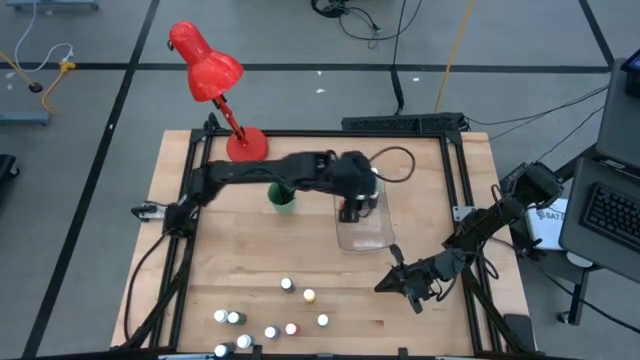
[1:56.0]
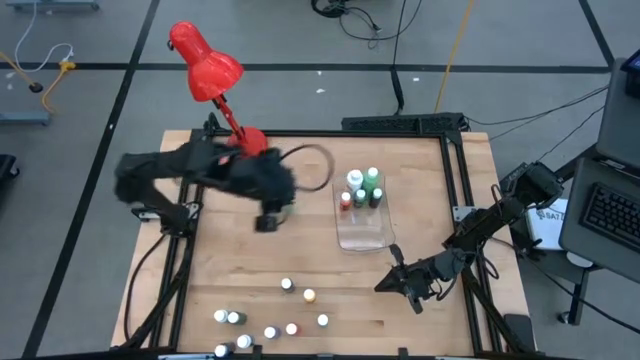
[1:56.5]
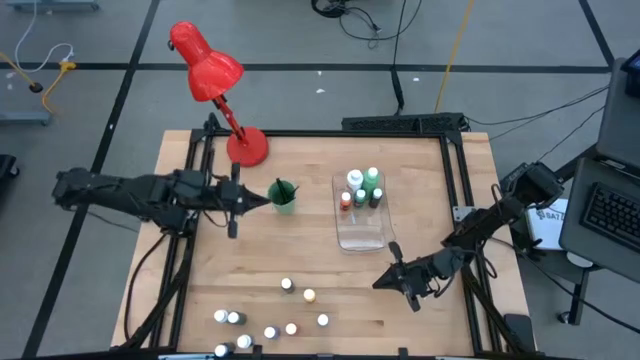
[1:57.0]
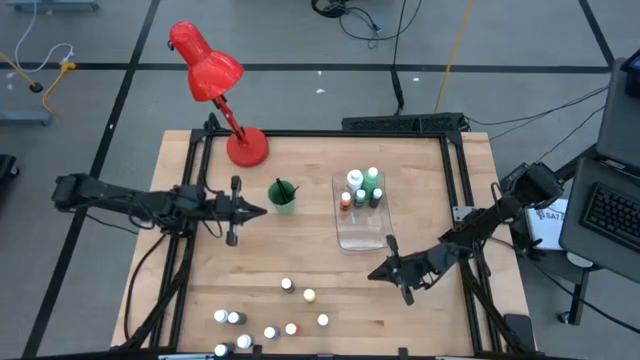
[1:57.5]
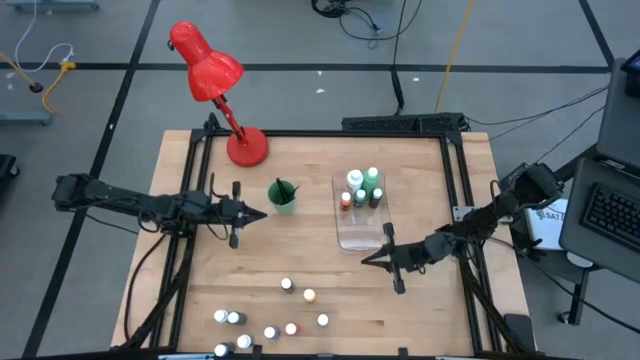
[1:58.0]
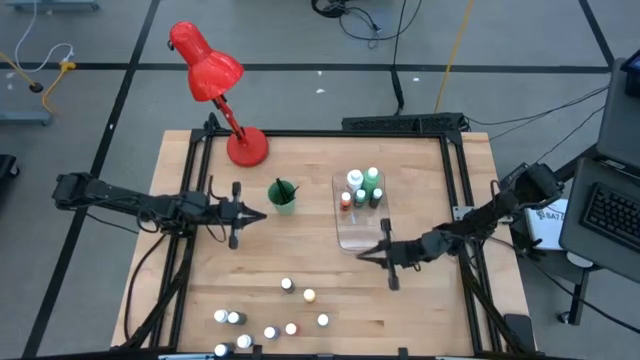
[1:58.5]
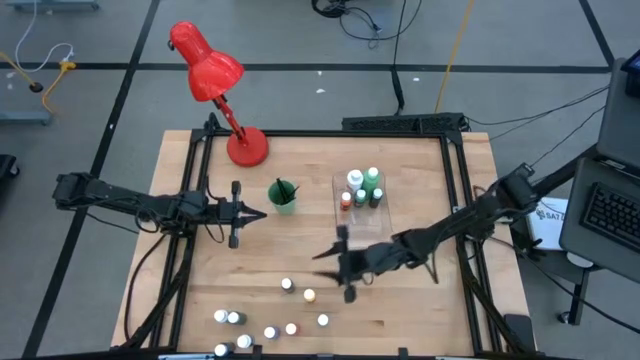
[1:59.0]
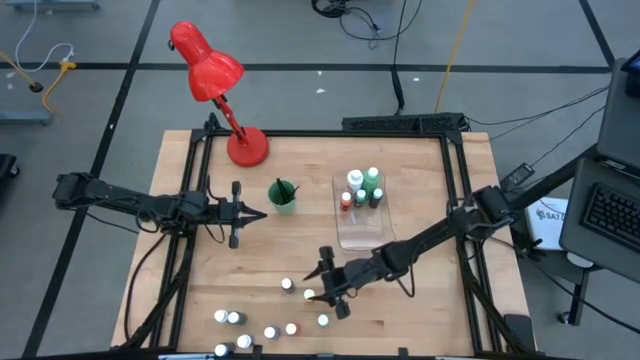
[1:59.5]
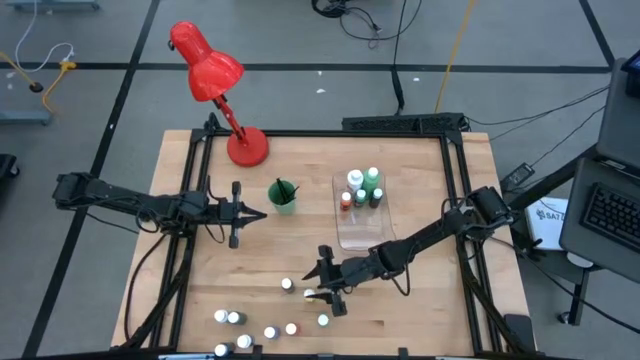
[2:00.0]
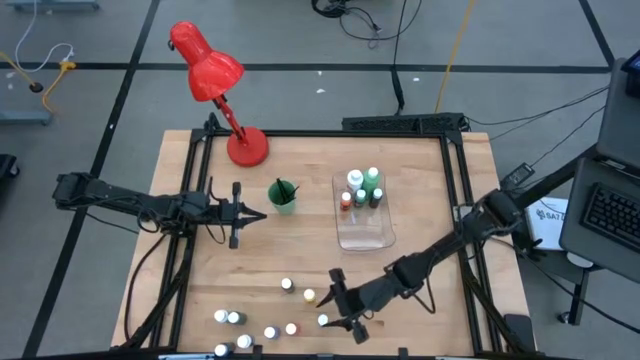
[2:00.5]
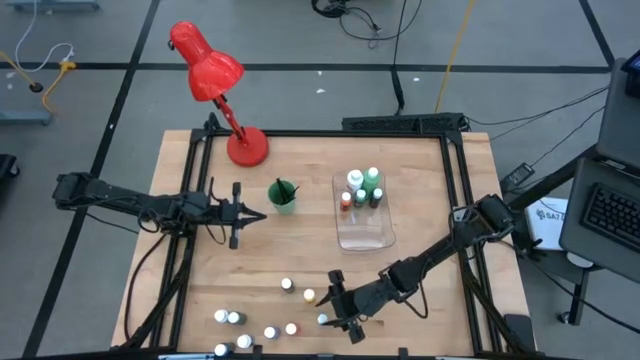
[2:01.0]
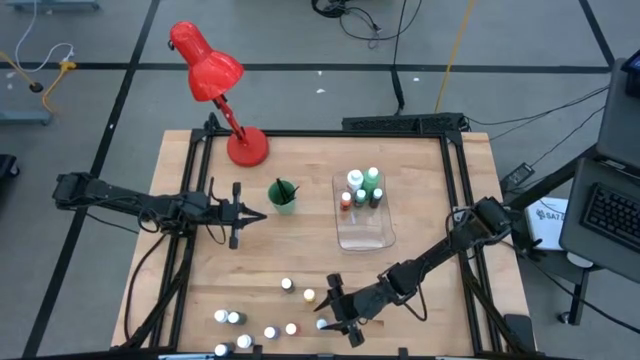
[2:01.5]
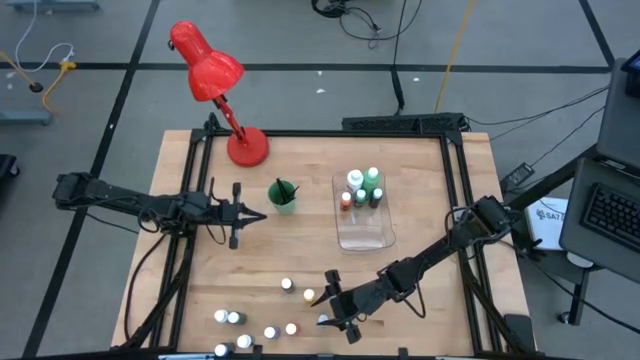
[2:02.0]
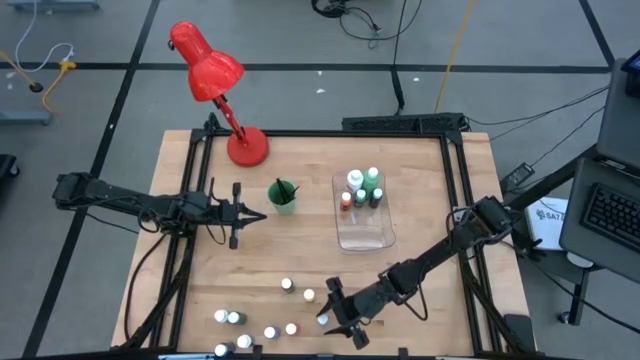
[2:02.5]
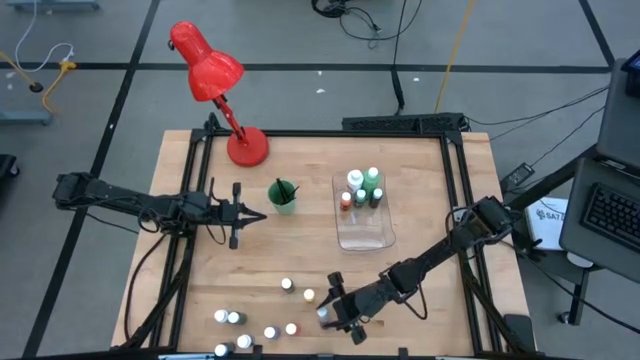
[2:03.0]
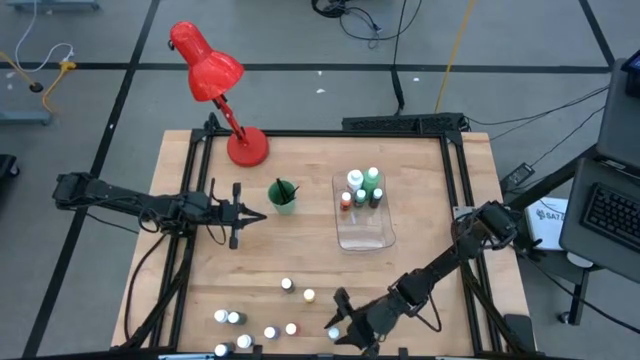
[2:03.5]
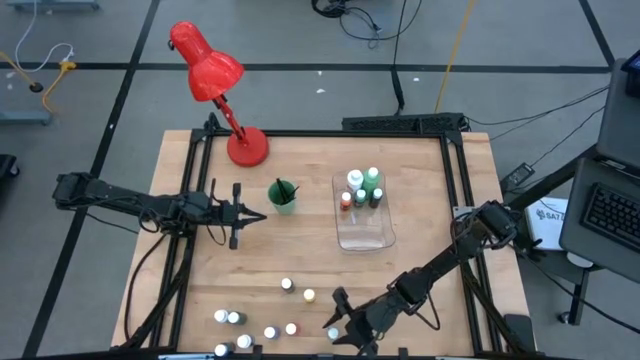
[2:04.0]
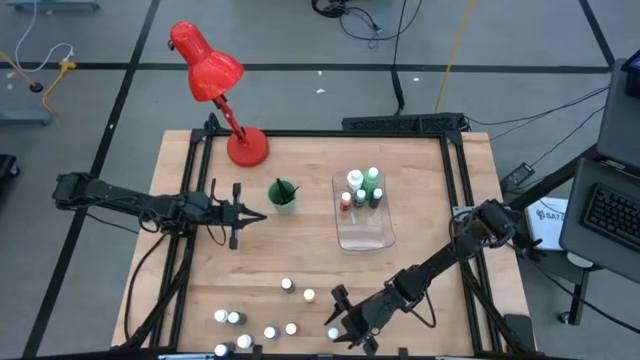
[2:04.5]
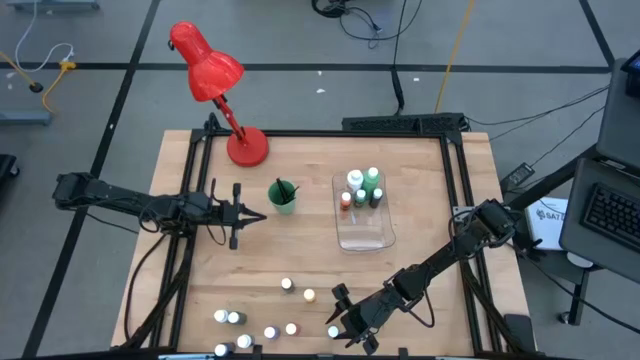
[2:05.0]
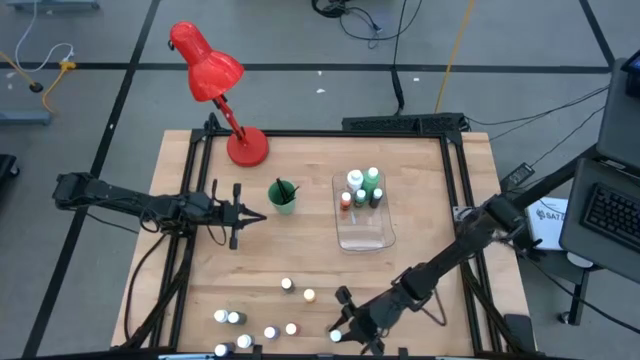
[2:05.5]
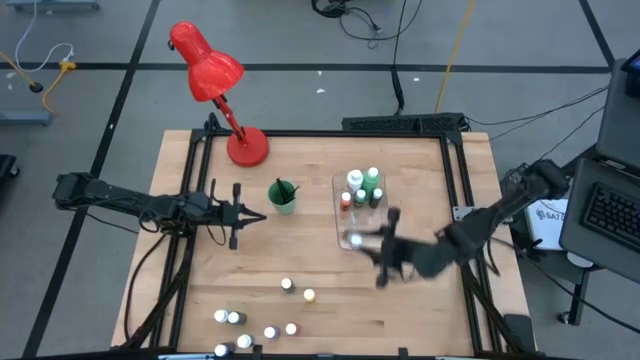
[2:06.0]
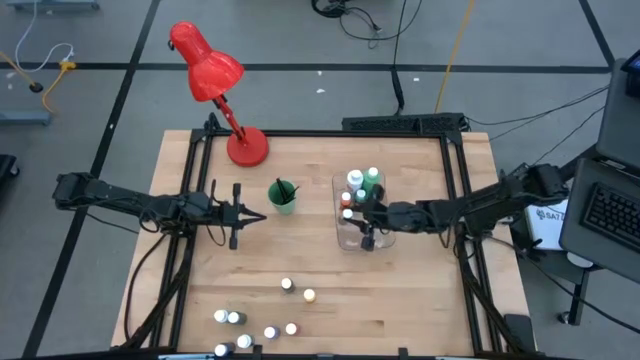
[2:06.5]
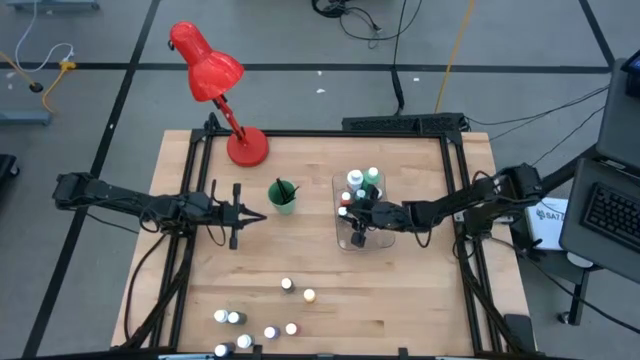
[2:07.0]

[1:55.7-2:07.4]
Task: Pick & Place Paint Supplies
Put the small gray paint bottle into the transparent bin

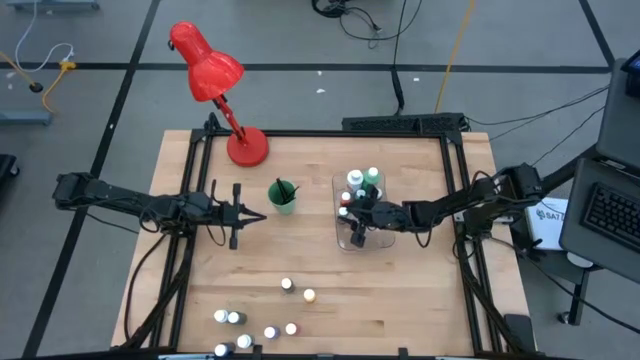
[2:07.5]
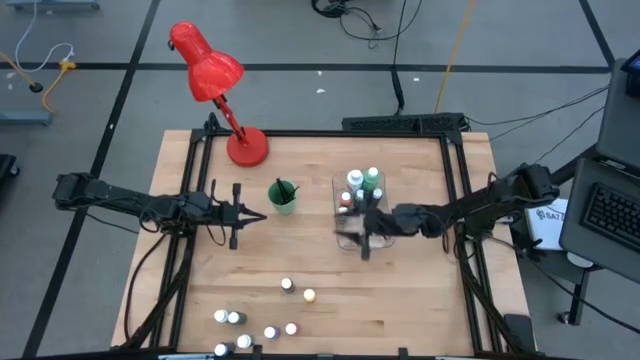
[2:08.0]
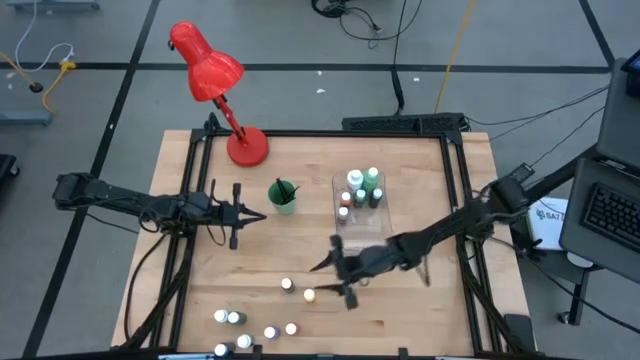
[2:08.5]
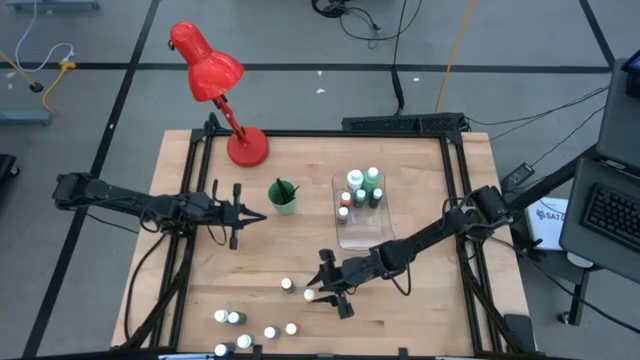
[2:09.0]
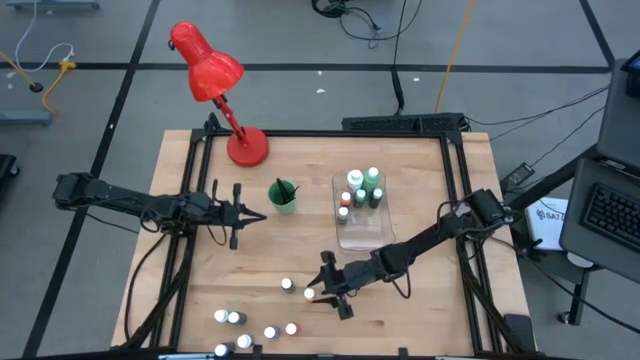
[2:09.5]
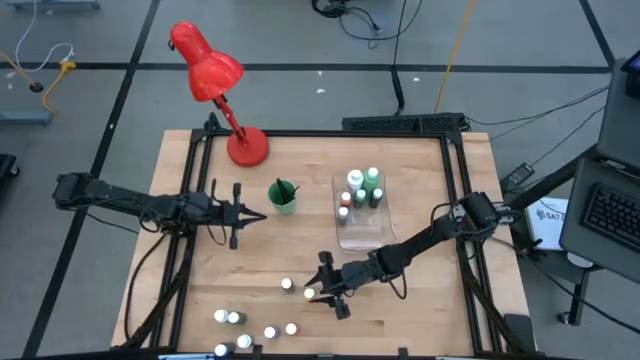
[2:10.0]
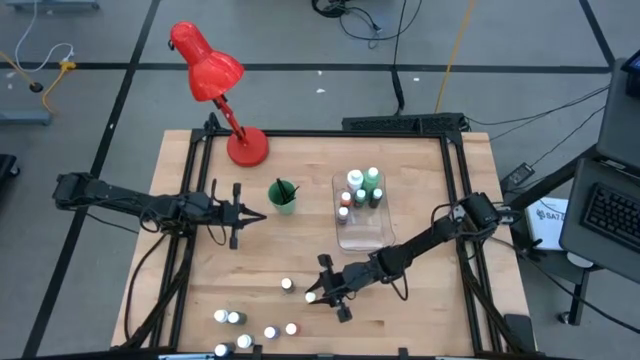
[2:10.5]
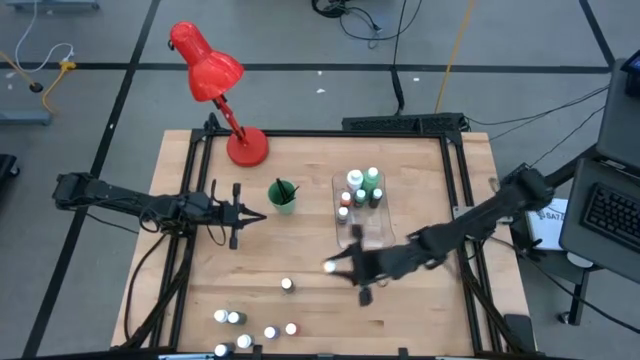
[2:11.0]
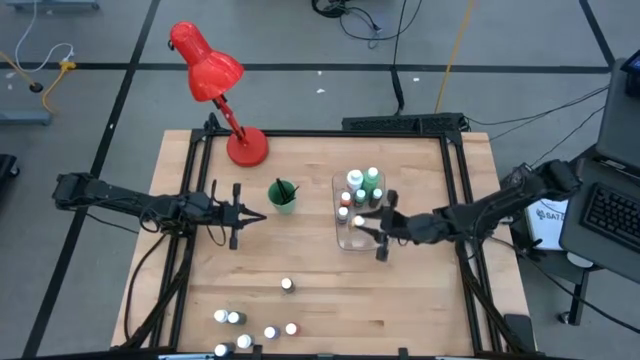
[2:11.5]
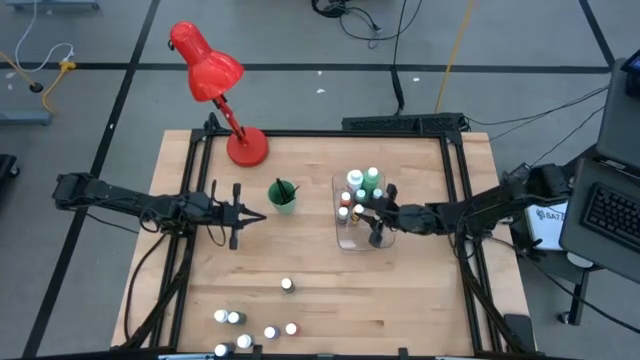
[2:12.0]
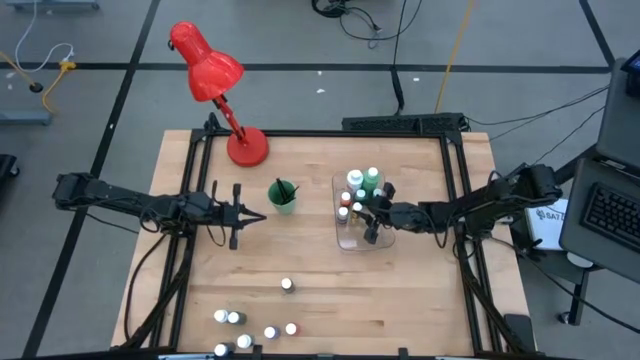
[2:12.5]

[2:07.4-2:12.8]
Put the small yellow paint bottle into the transparent bin

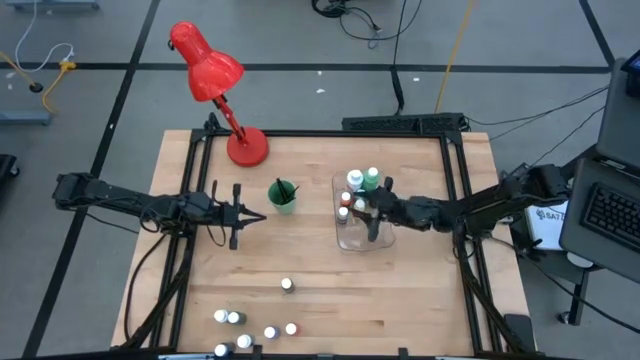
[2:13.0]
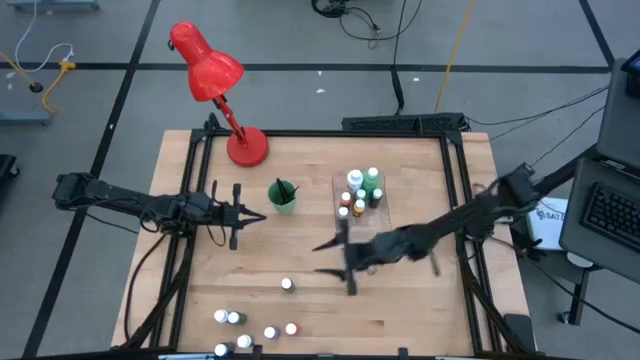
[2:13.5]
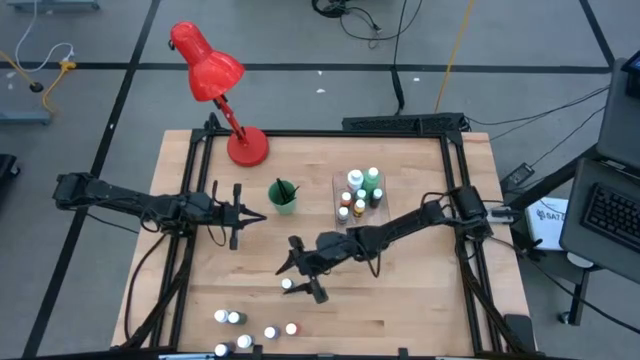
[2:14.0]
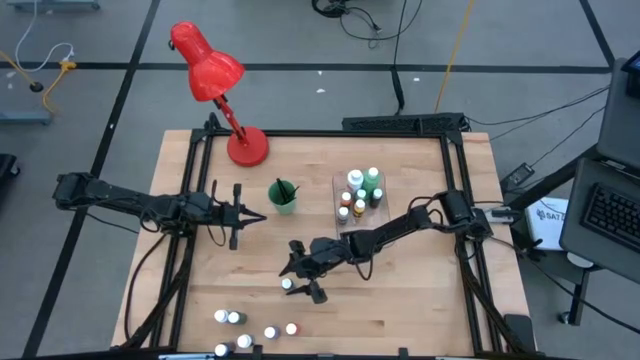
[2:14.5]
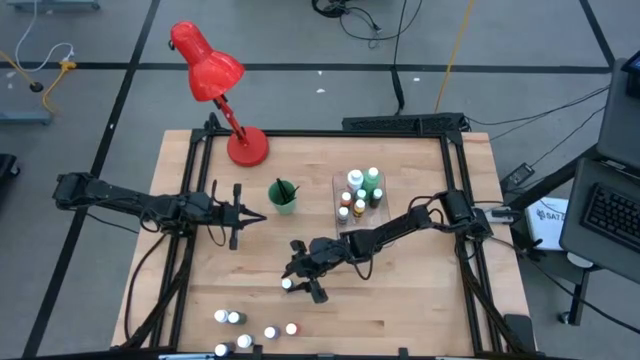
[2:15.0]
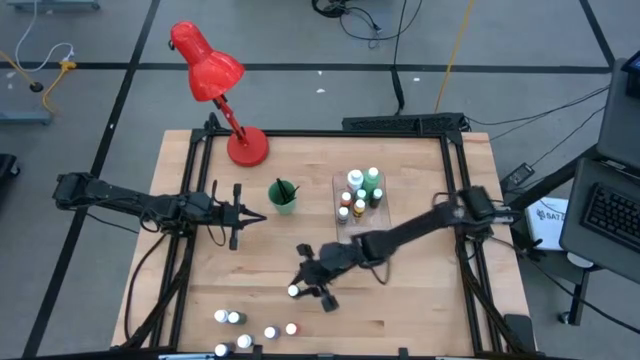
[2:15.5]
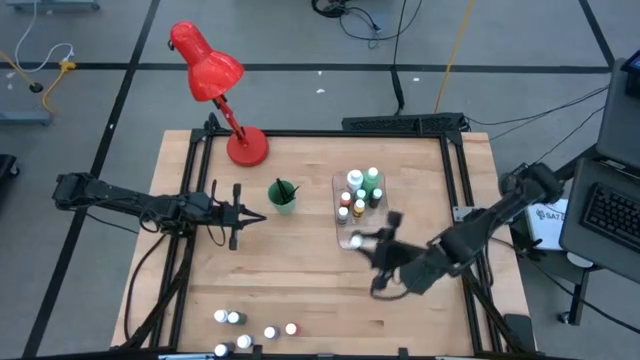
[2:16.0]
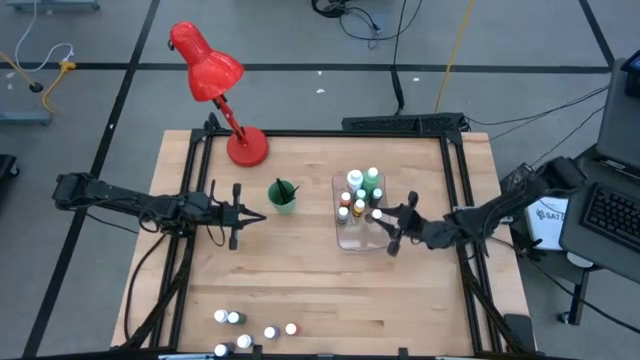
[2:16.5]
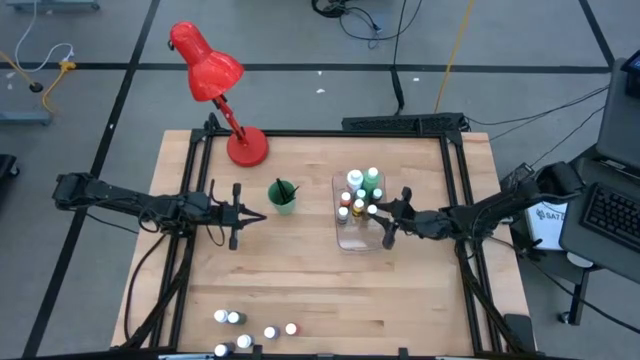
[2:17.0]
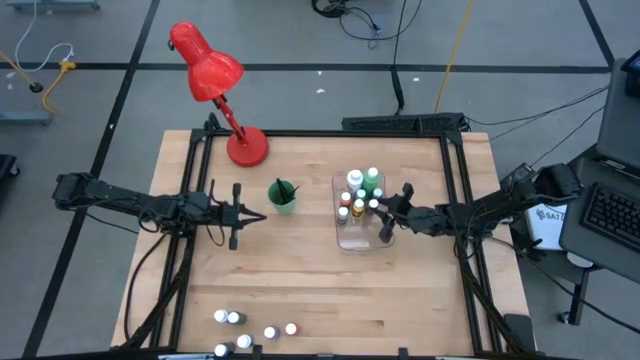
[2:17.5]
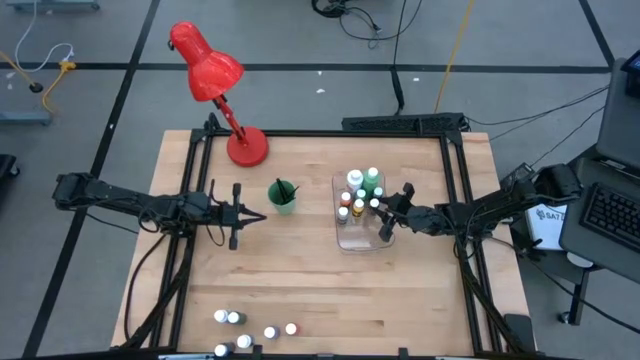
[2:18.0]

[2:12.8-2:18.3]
Put the small black paint bottle into the transparent bin
